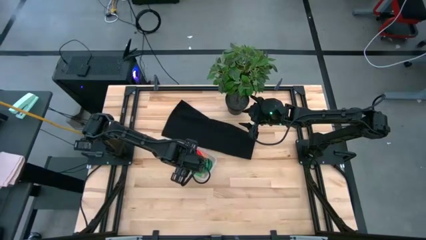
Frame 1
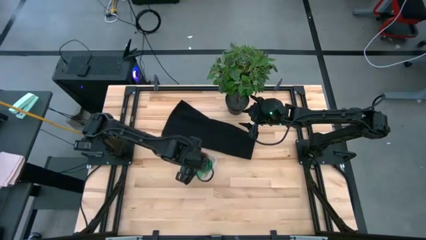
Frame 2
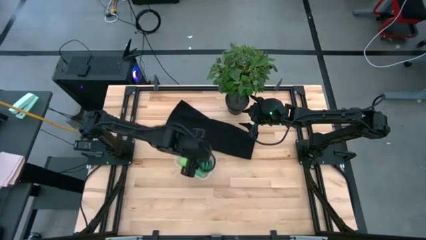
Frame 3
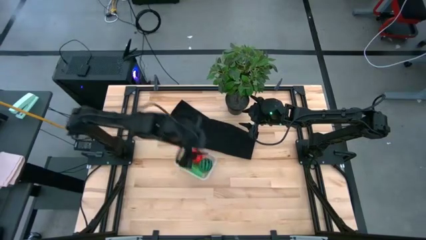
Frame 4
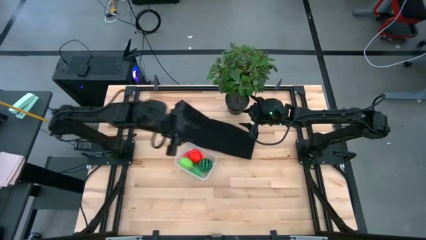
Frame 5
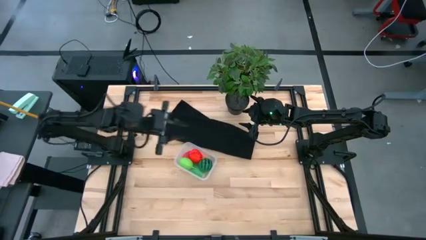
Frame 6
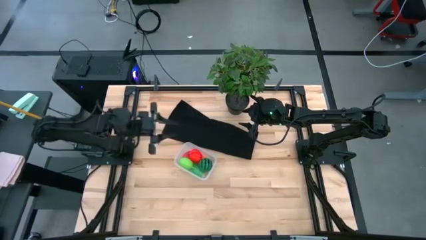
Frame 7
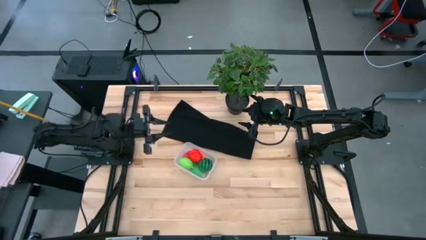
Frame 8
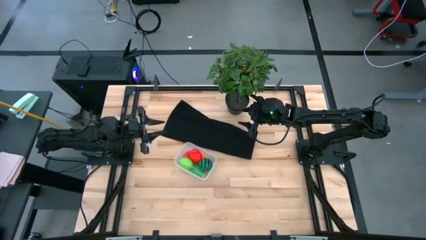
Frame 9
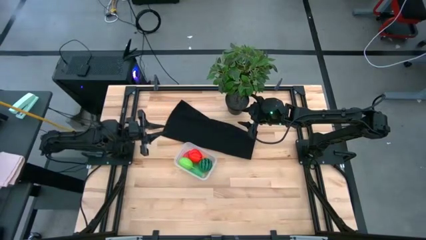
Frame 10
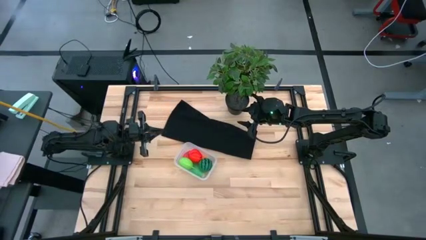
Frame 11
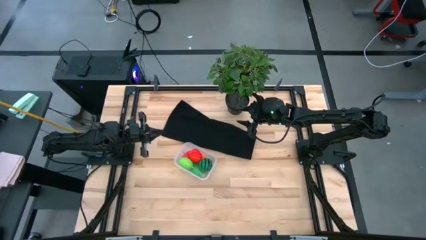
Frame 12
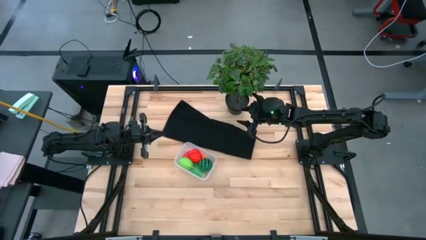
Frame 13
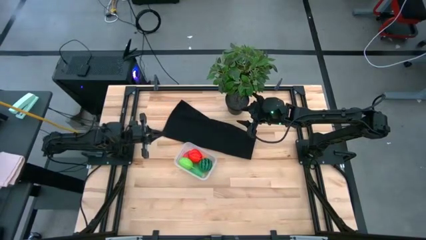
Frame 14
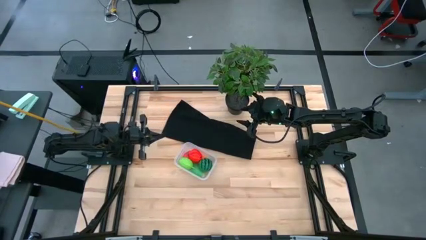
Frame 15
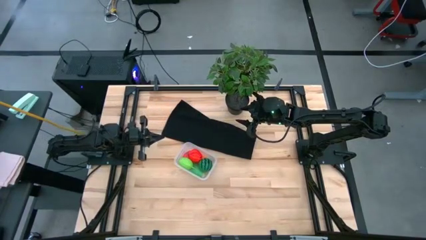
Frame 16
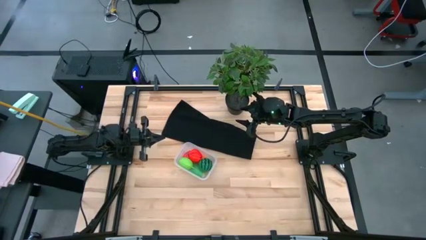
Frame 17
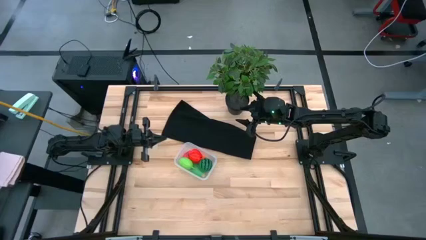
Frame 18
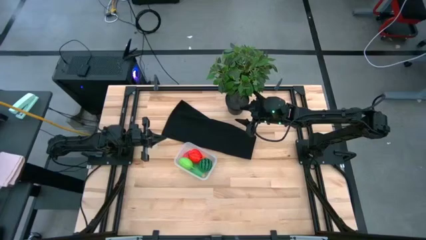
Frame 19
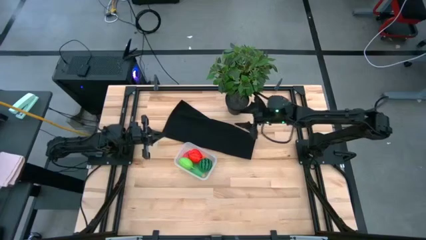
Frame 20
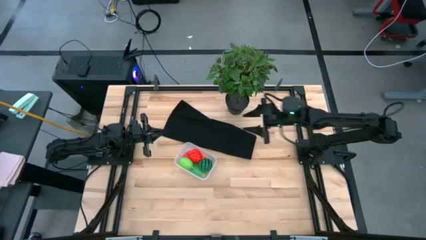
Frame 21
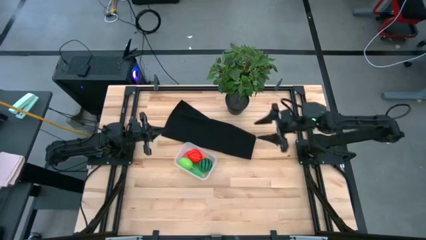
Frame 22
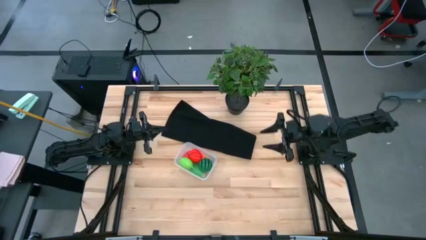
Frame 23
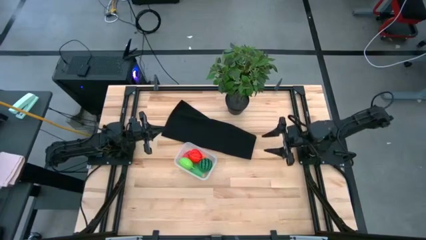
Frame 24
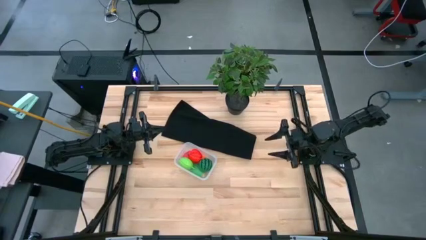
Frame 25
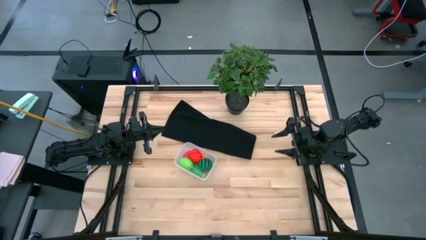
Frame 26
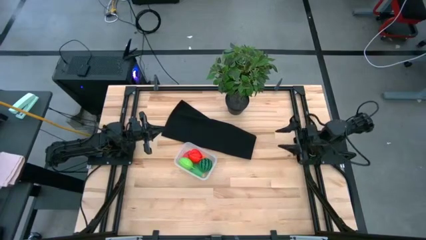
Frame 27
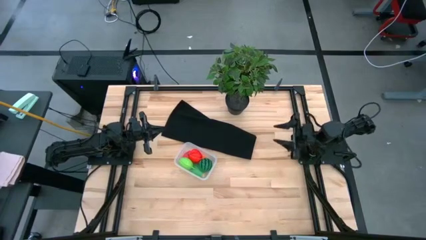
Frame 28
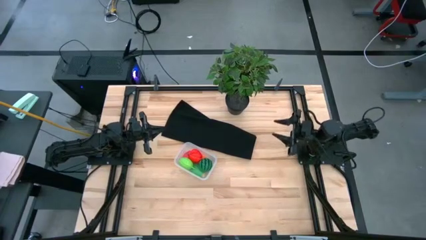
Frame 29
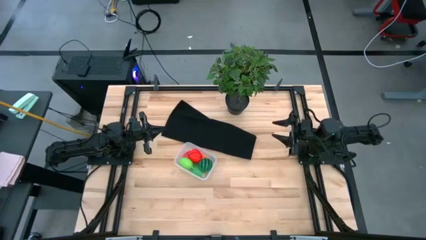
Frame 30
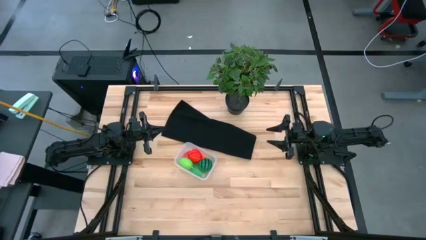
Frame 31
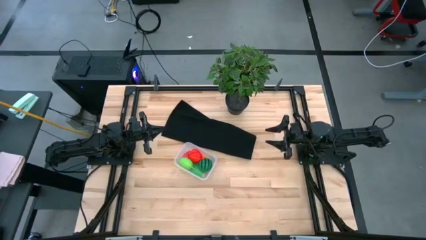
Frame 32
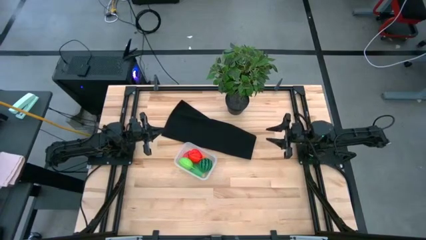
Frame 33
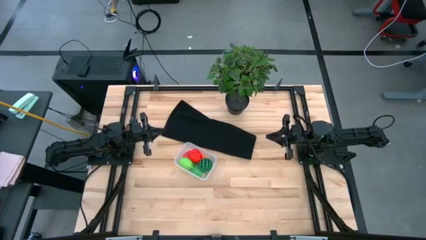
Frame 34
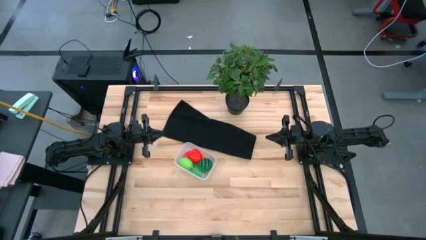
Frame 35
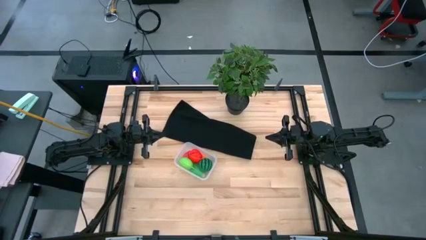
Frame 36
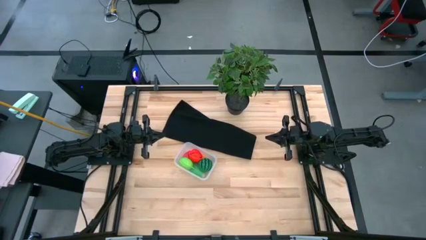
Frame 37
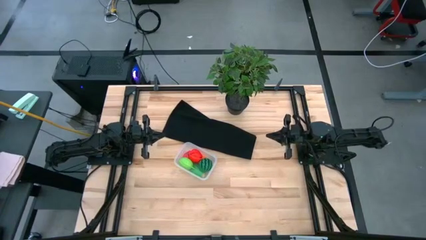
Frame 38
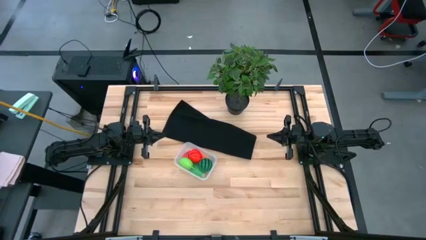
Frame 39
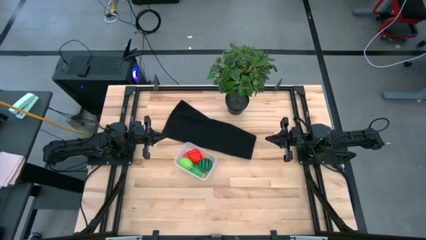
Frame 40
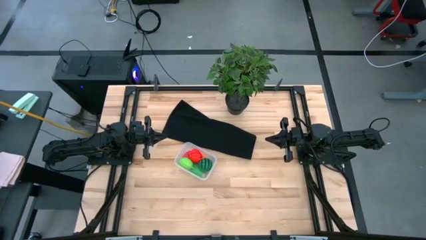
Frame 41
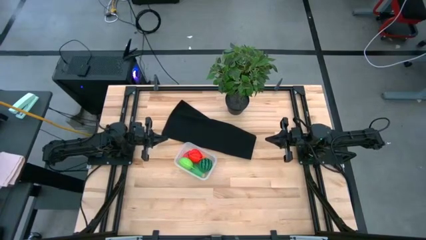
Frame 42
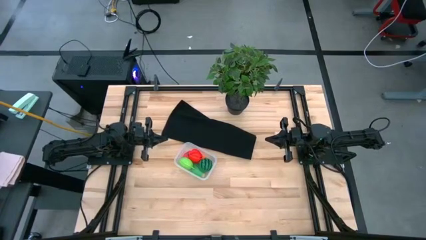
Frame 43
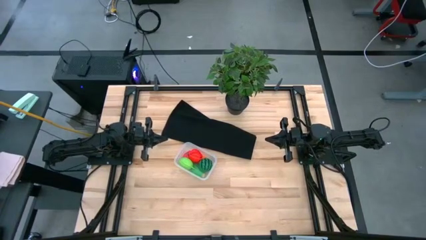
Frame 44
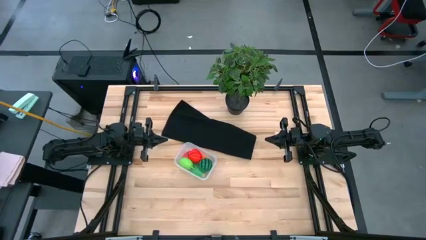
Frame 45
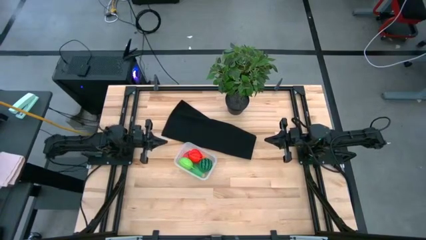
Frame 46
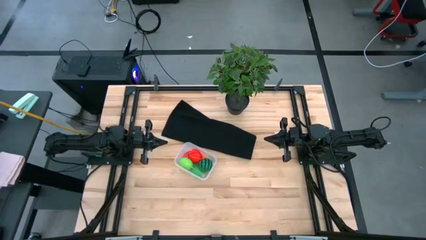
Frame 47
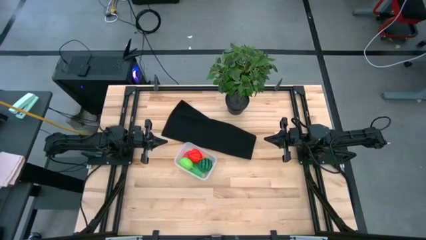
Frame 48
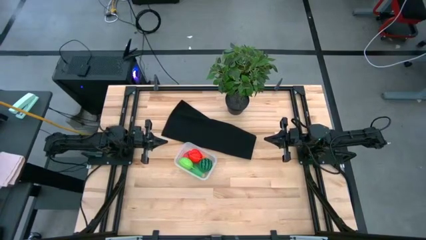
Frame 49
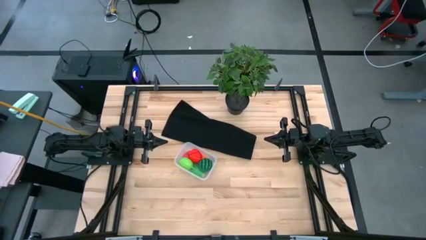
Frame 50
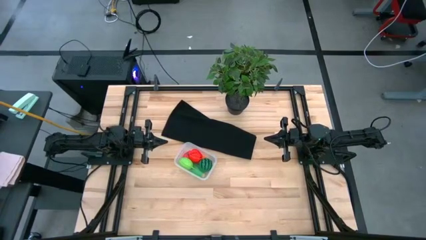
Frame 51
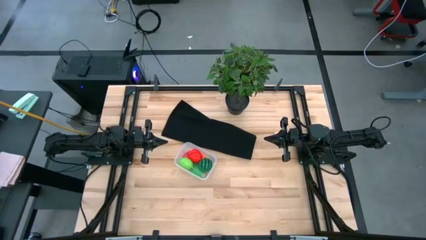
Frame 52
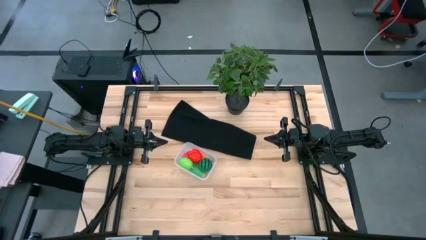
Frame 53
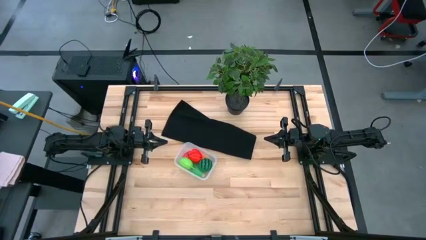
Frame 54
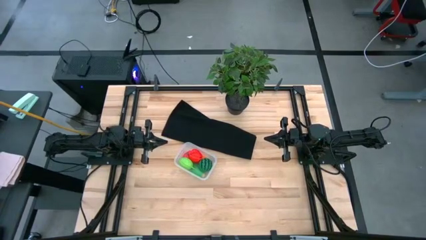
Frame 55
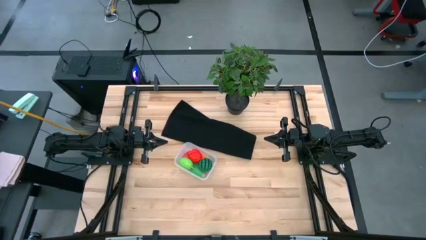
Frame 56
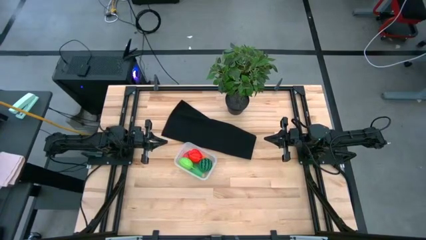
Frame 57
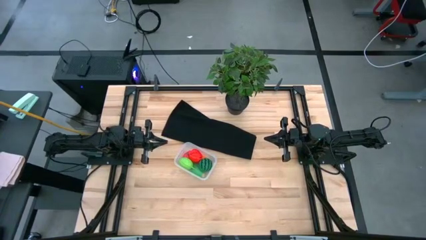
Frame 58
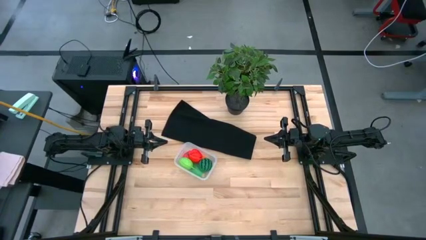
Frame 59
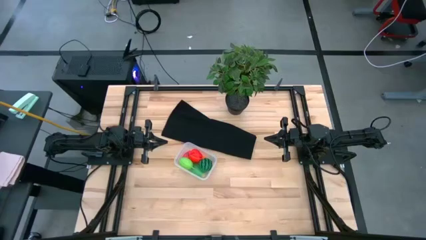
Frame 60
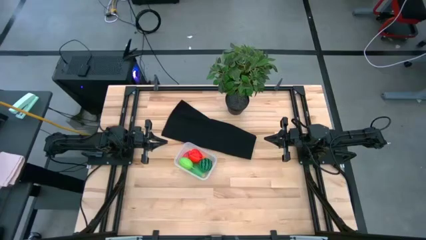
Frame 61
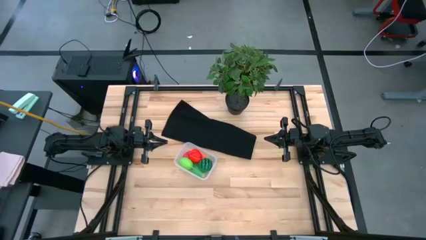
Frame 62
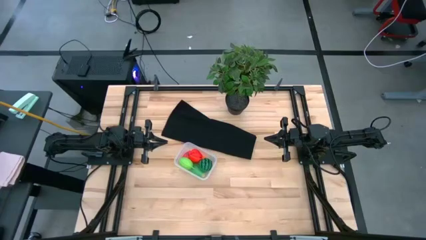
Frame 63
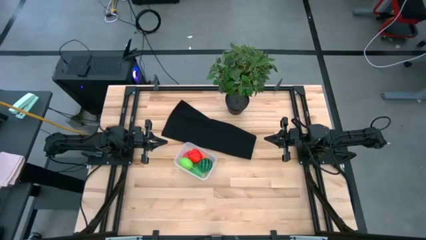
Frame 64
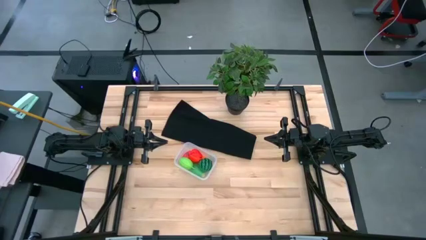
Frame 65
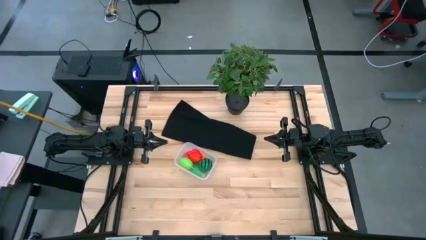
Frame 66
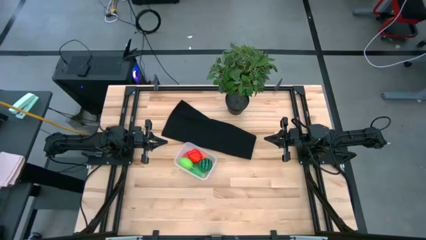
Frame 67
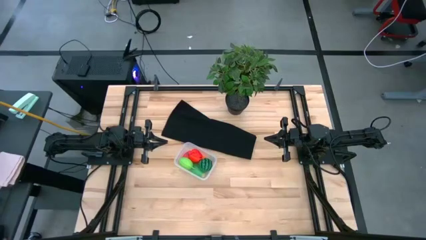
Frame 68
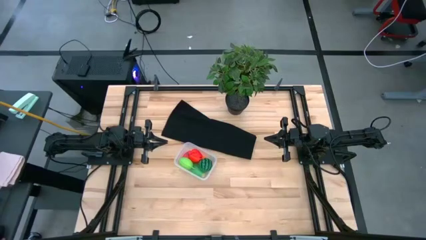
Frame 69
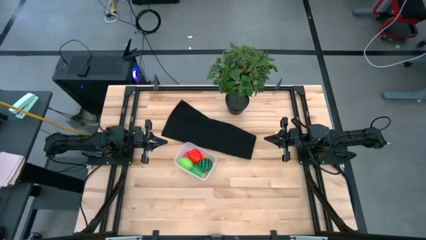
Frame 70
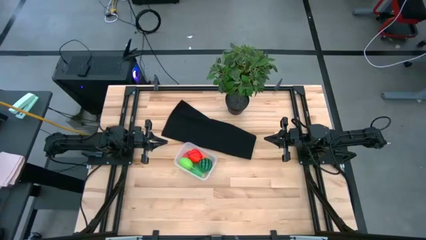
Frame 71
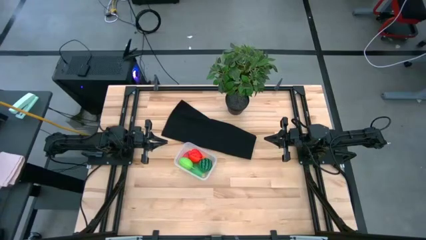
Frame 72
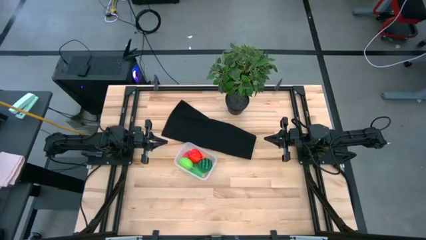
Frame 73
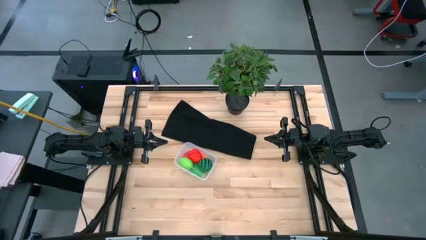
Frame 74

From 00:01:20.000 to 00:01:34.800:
Task: Pick and placing Produce into tupperware
Return to Home Position
